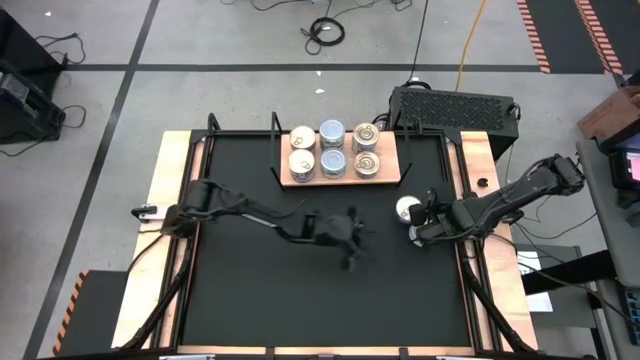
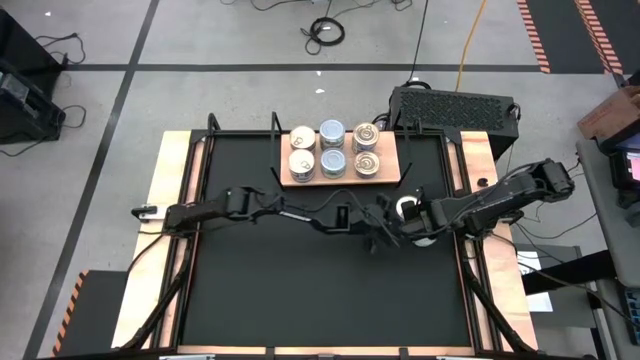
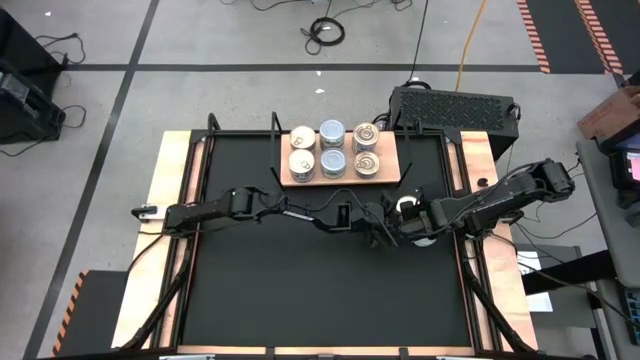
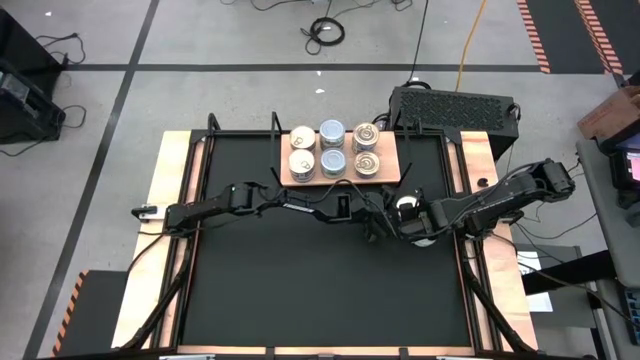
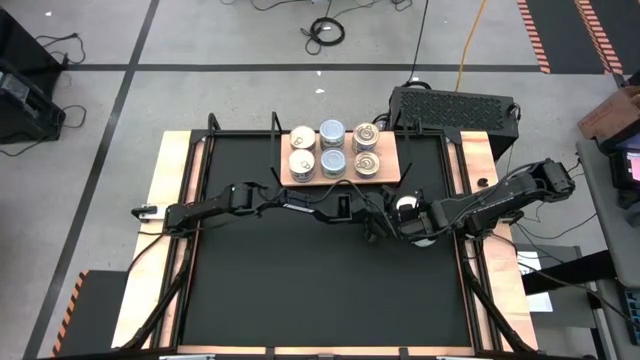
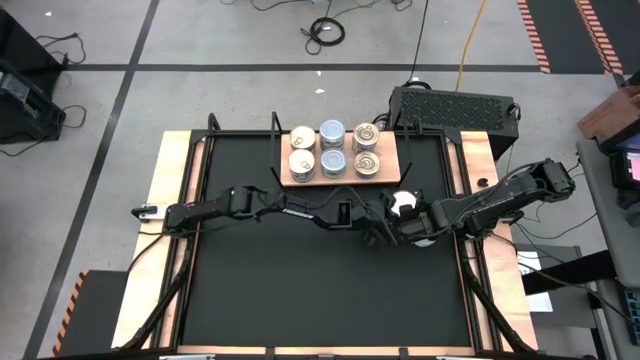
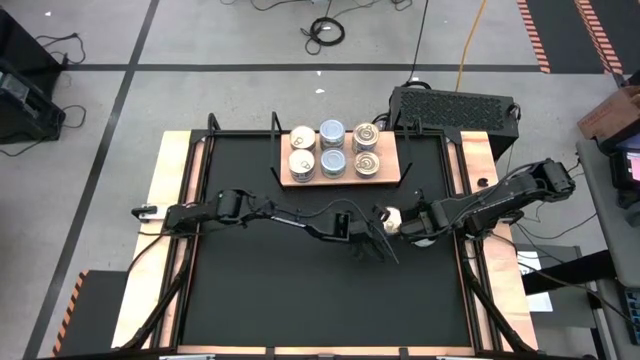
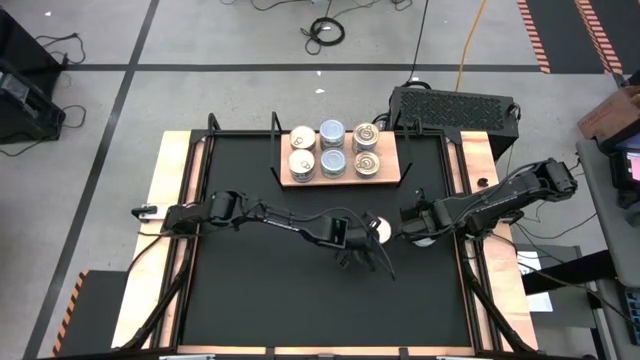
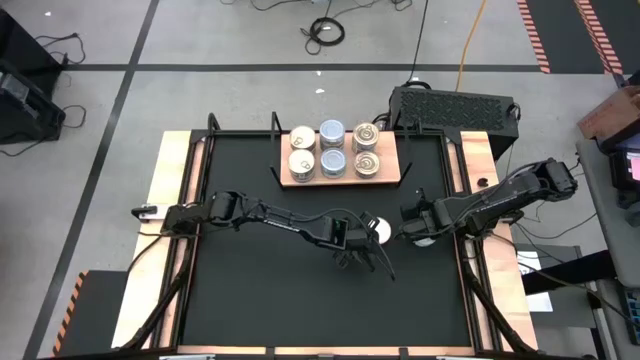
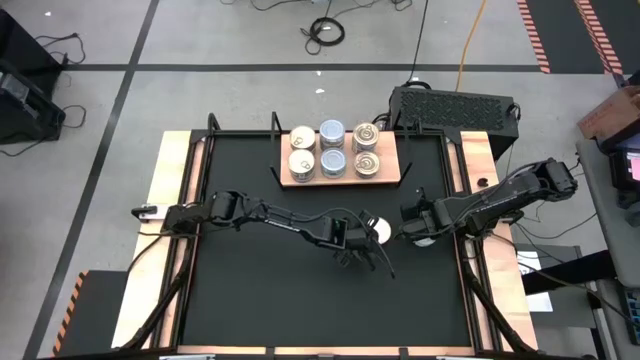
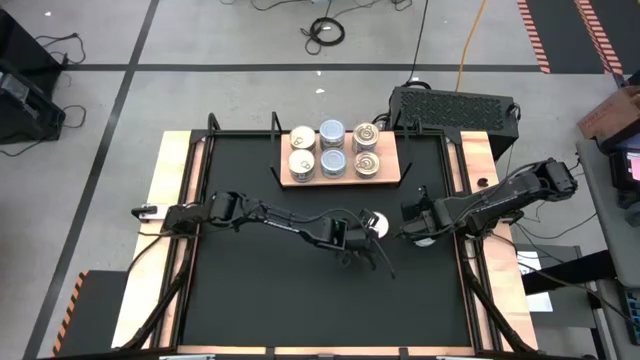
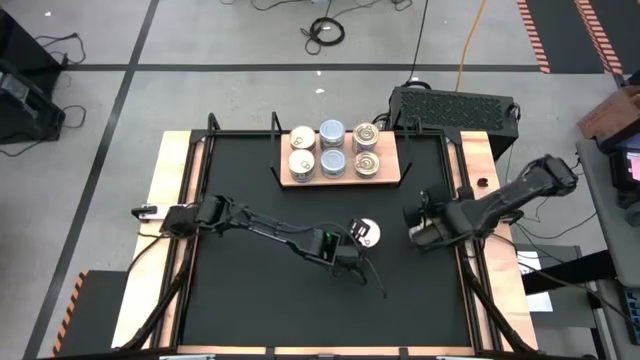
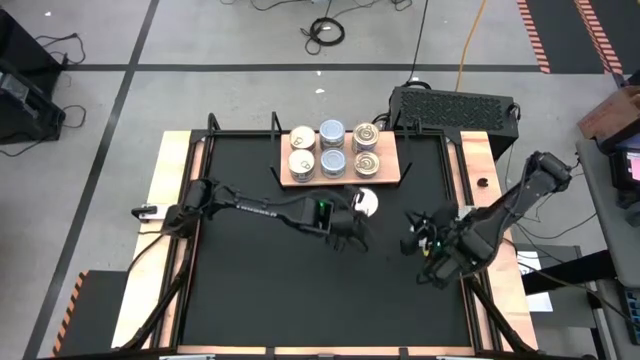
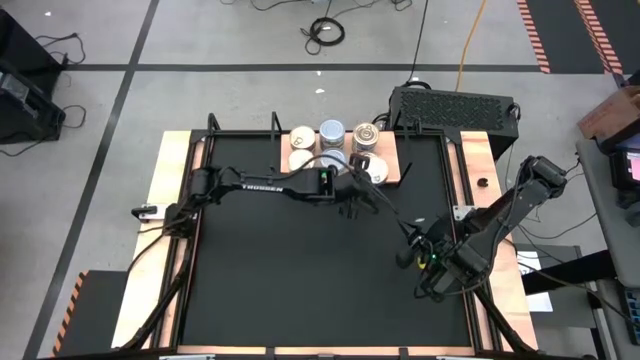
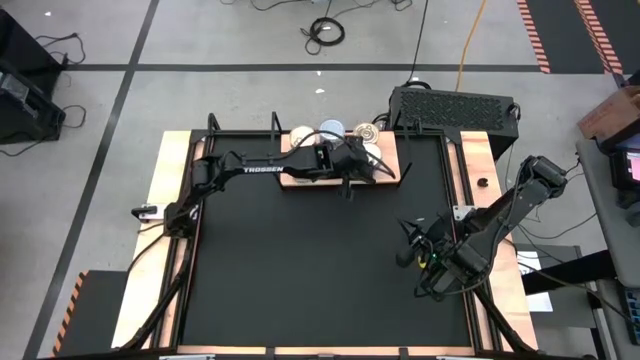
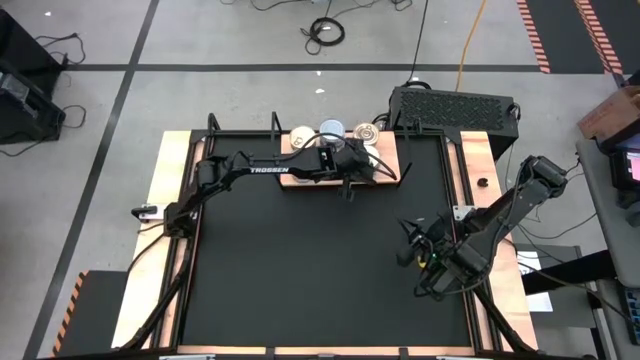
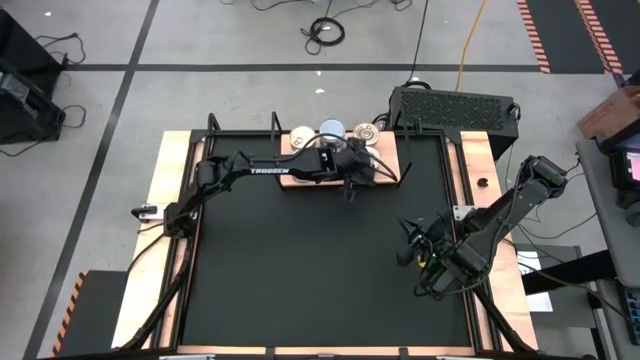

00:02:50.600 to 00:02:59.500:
Task: Stack canned seafood by type on shelf
Stack the blue tuna can on top of the blue tuna can on the shelf

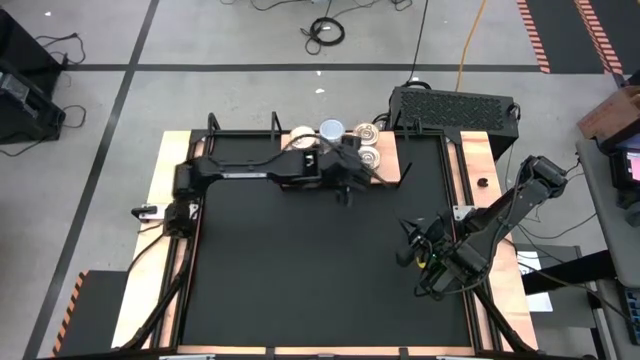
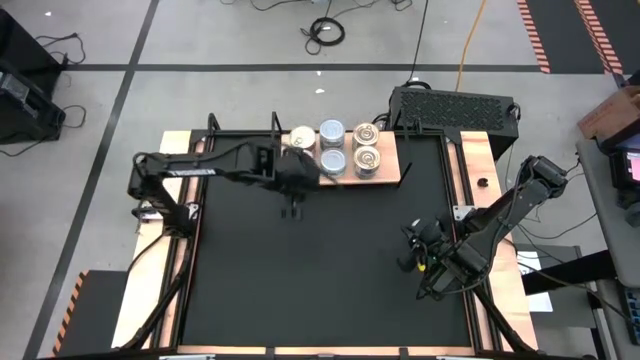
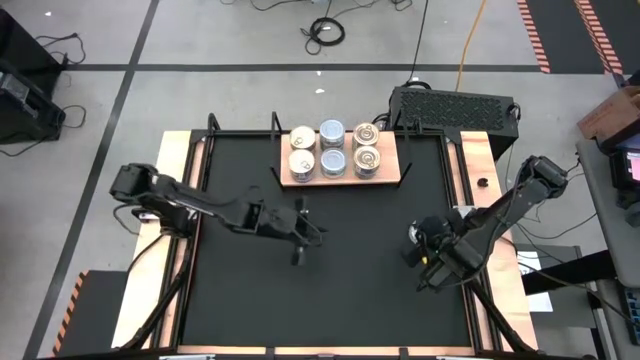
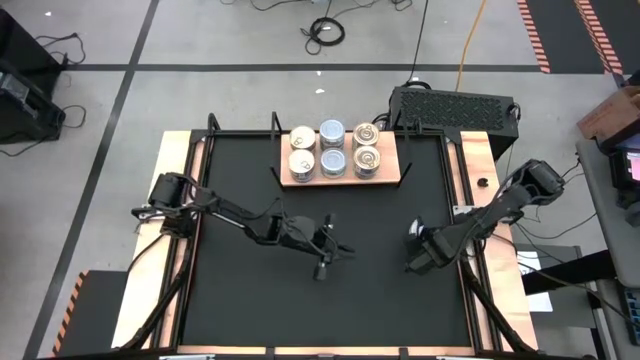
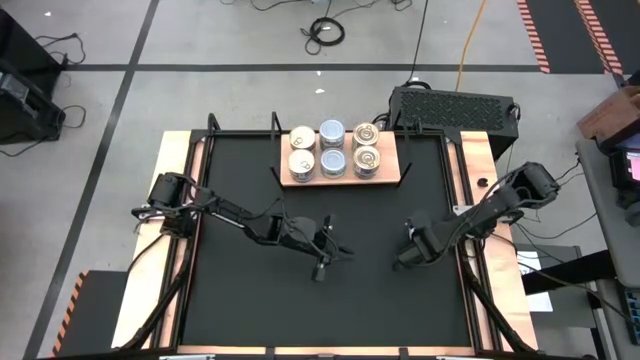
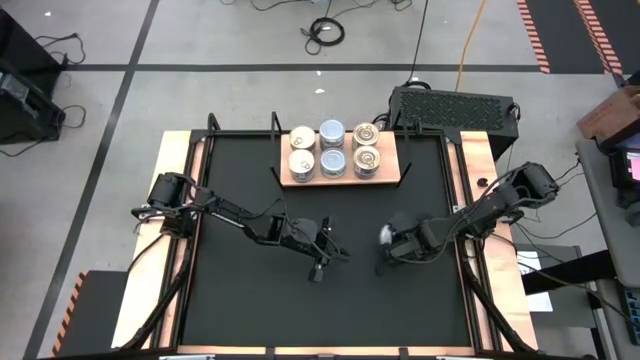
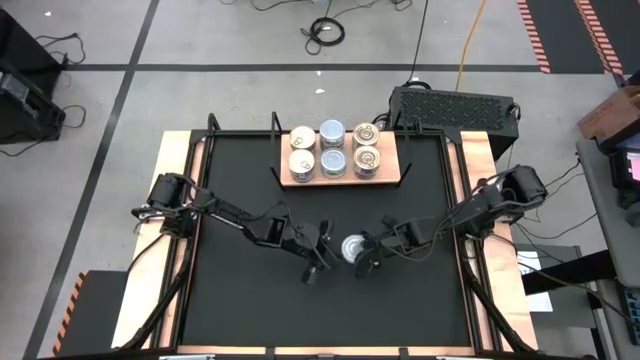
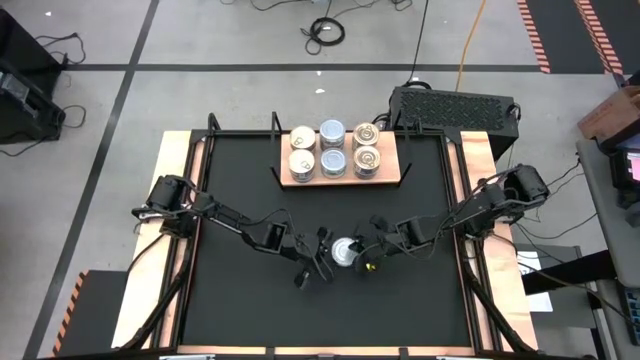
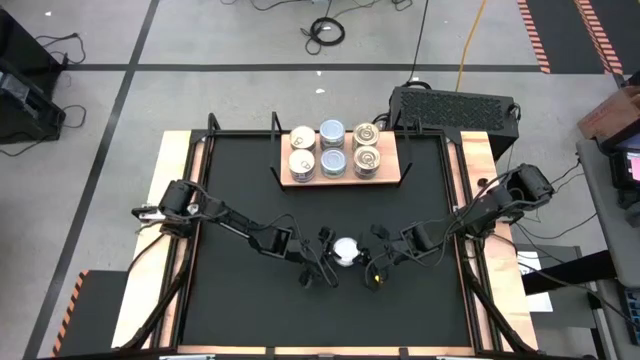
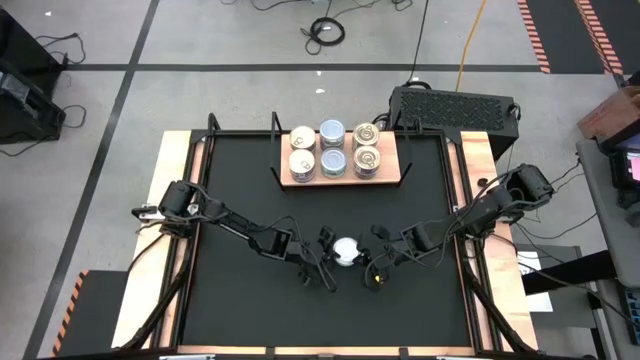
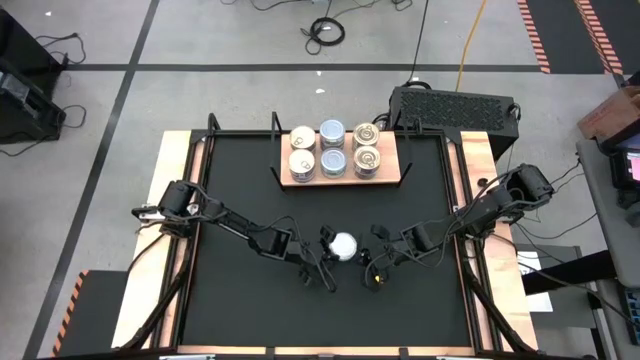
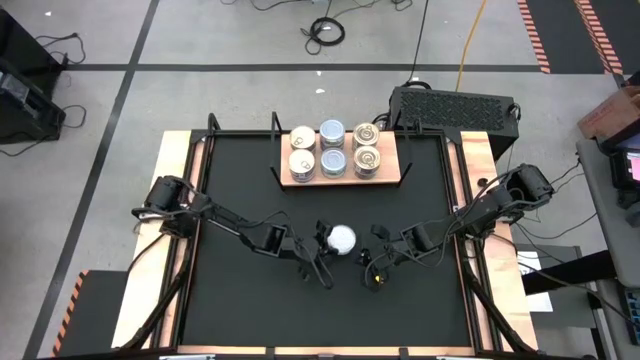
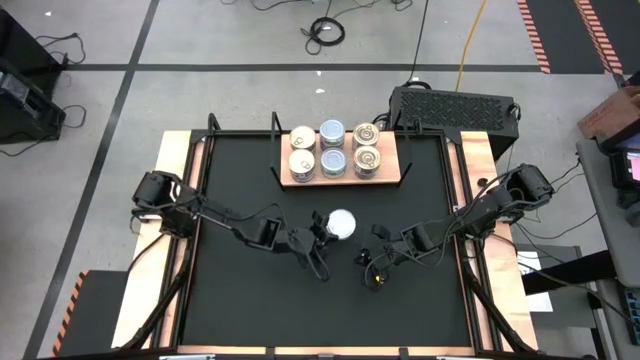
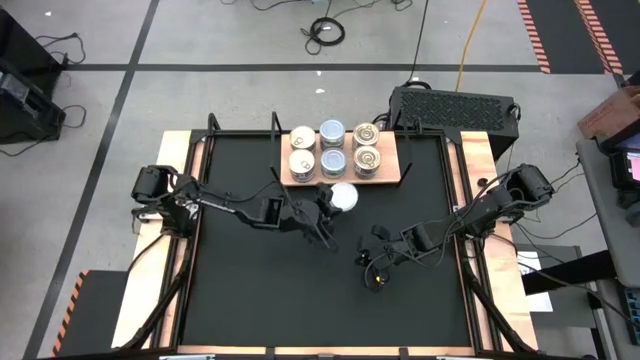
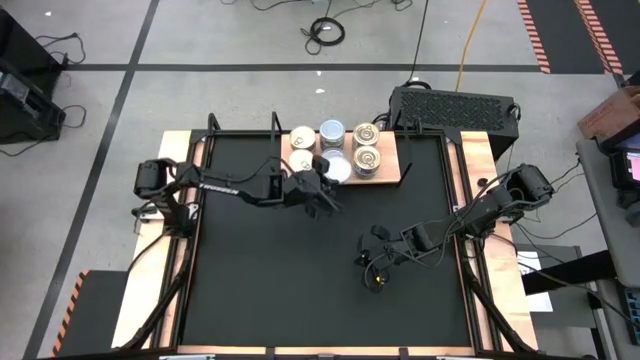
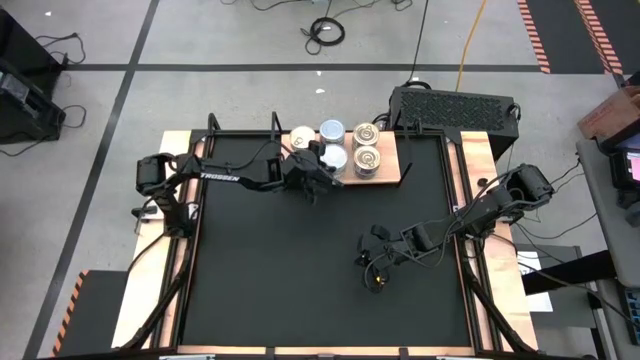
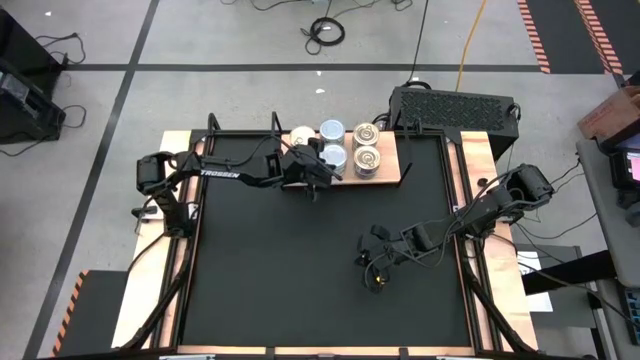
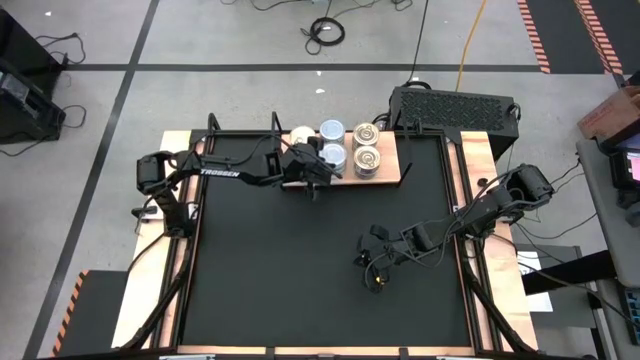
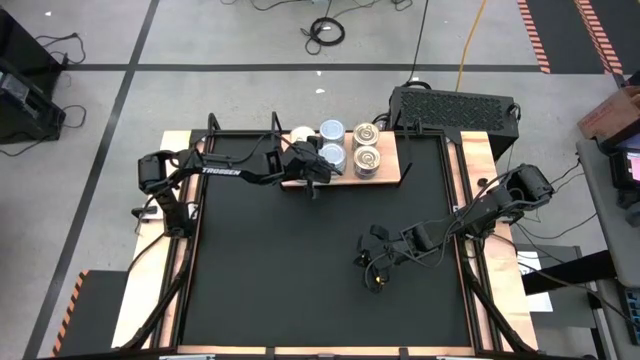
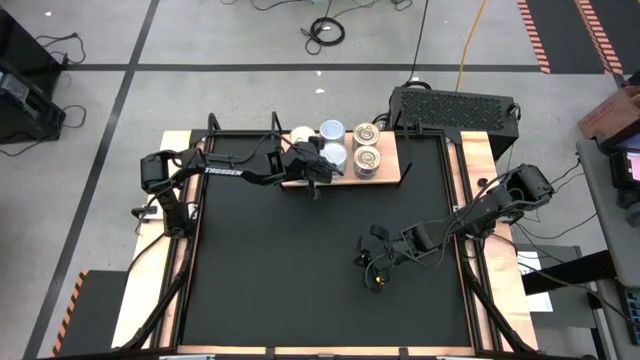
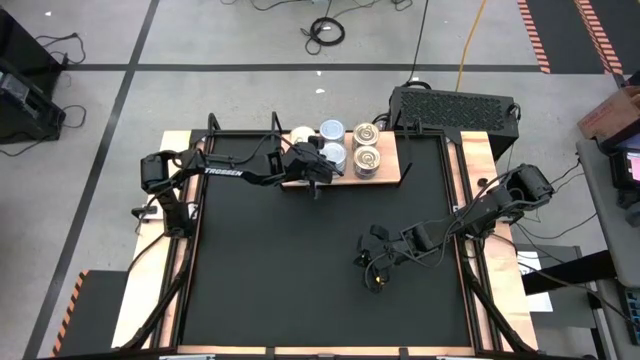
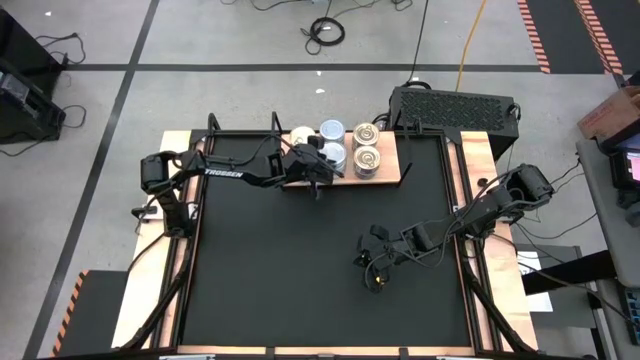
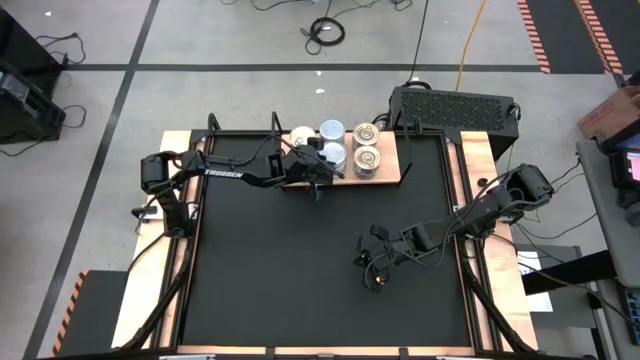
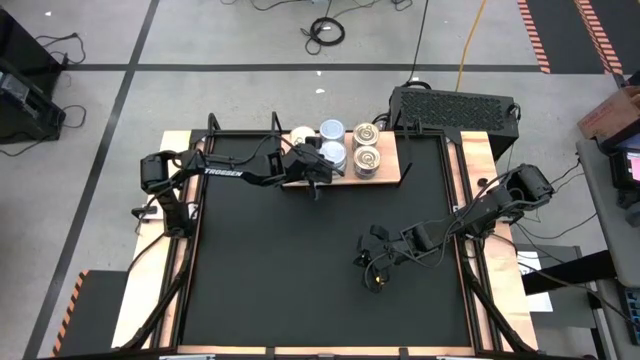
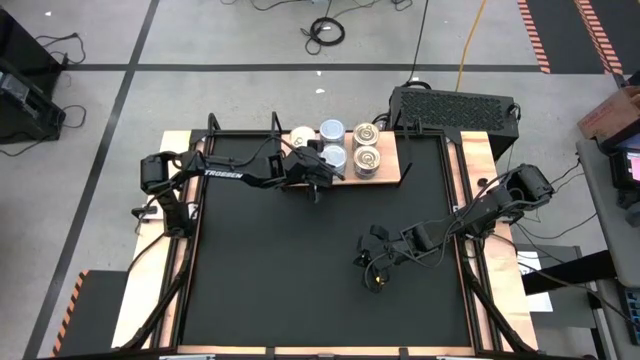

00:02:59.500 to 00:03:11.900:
Stack the green tuna can on top of the green tuna cans on the shelf
